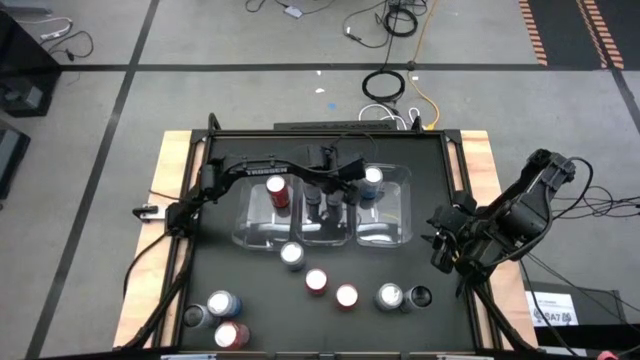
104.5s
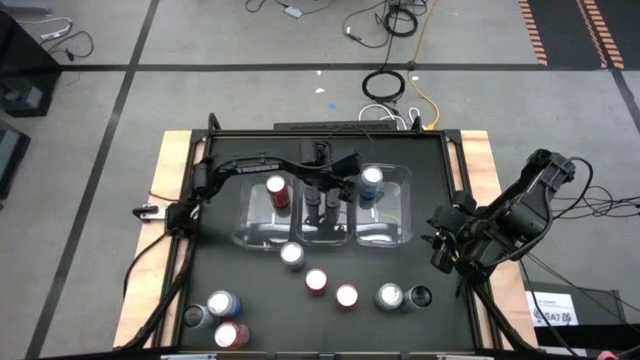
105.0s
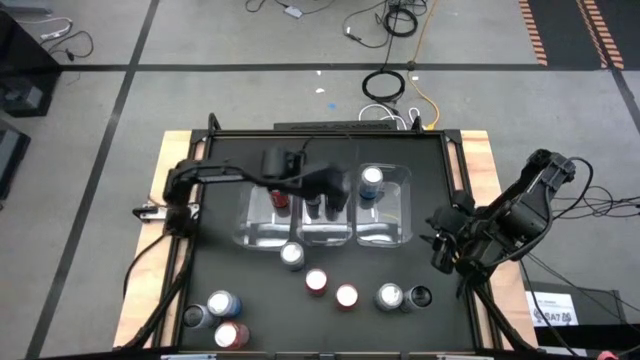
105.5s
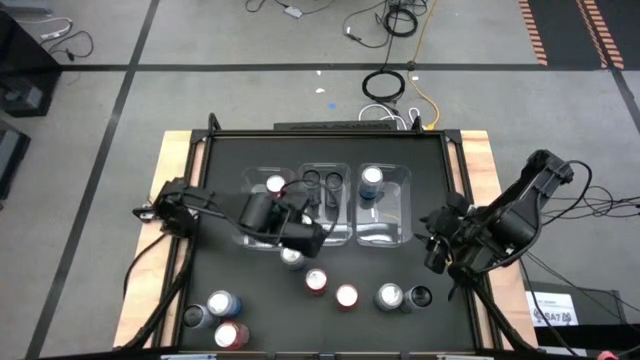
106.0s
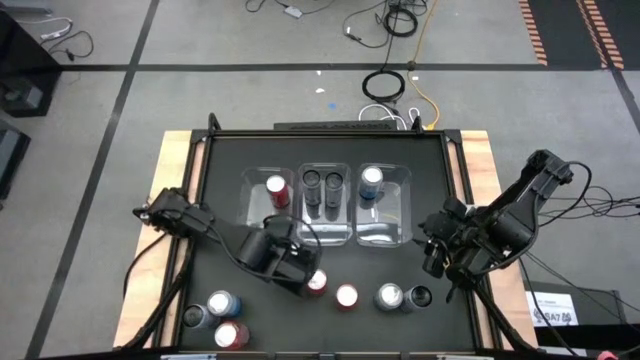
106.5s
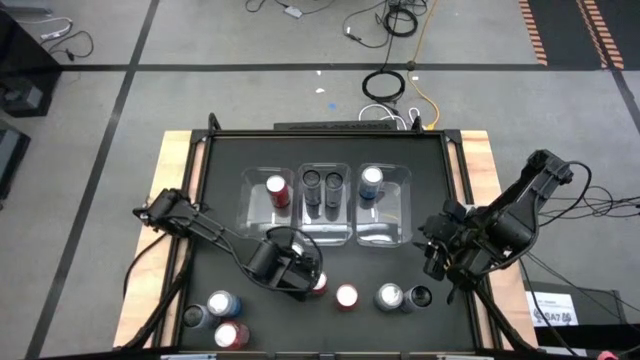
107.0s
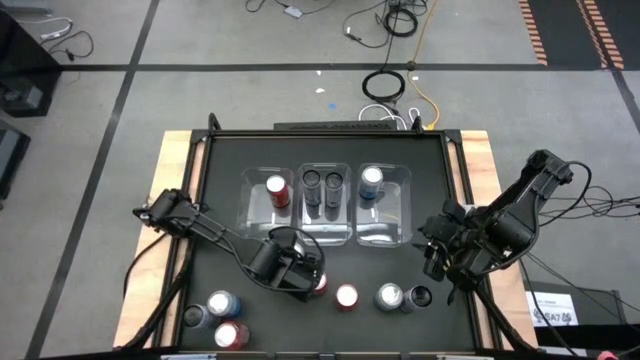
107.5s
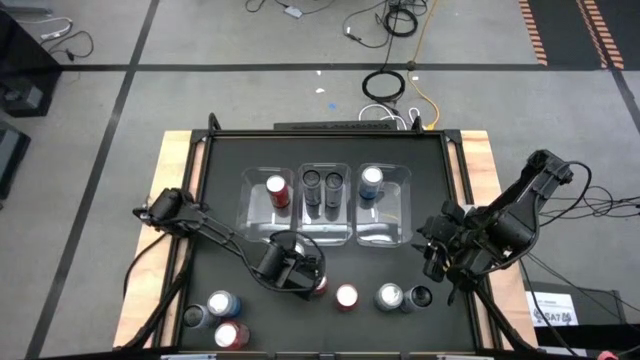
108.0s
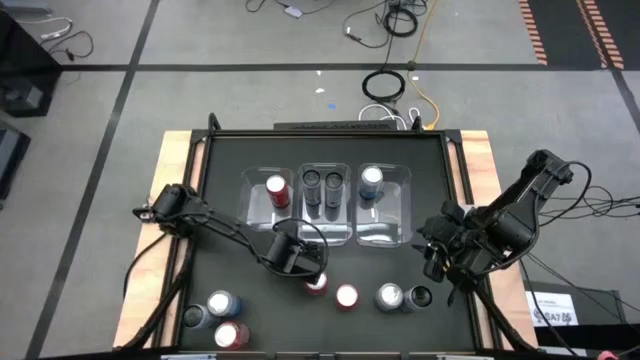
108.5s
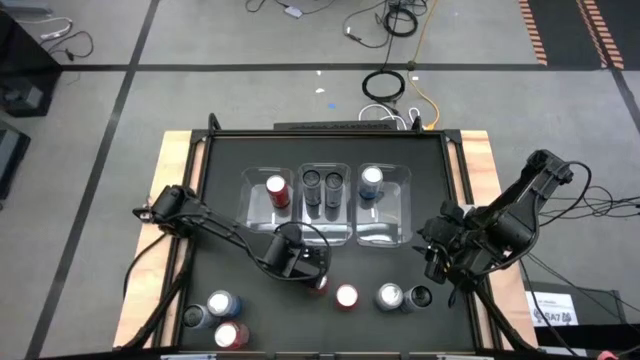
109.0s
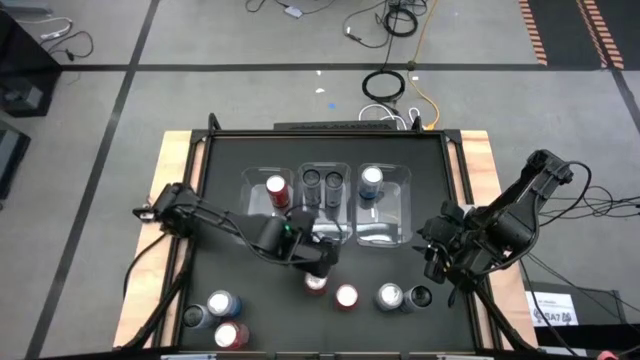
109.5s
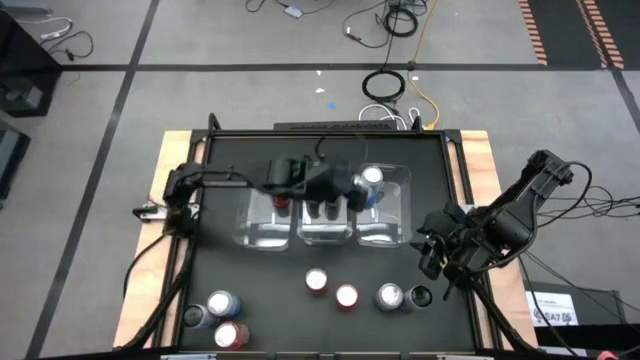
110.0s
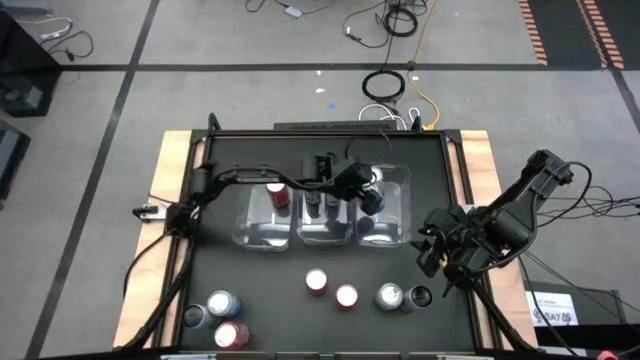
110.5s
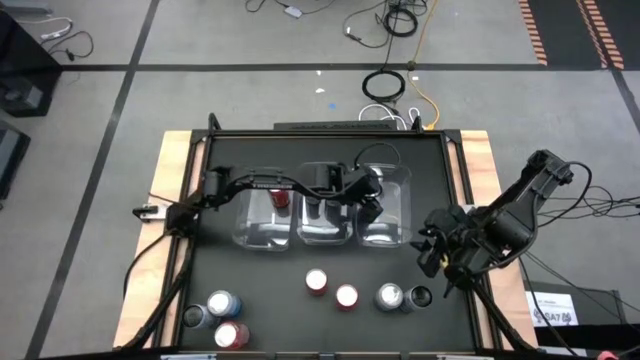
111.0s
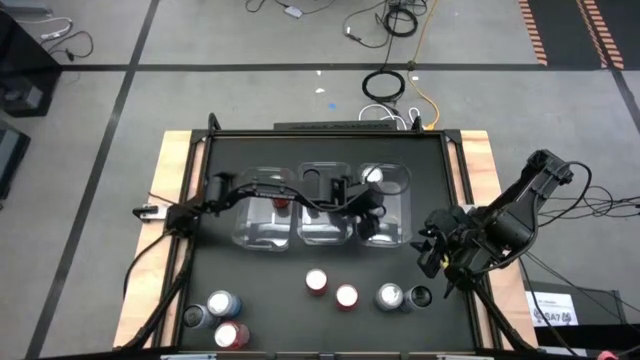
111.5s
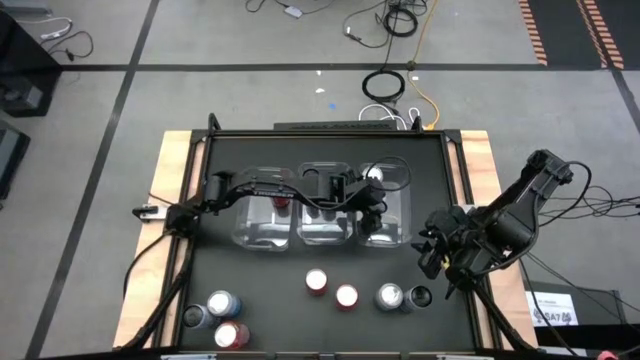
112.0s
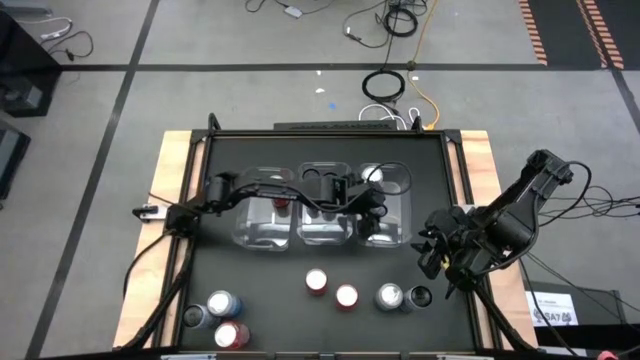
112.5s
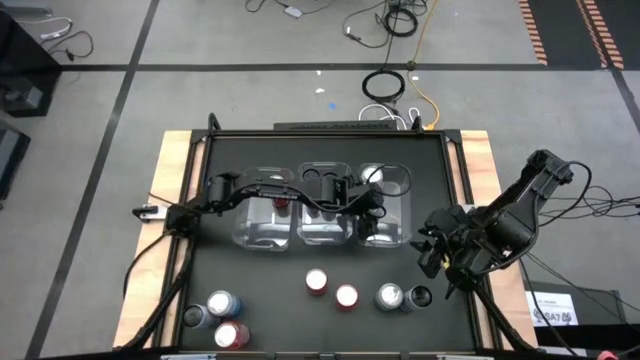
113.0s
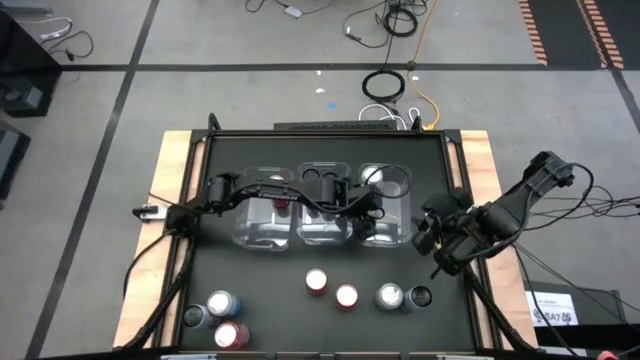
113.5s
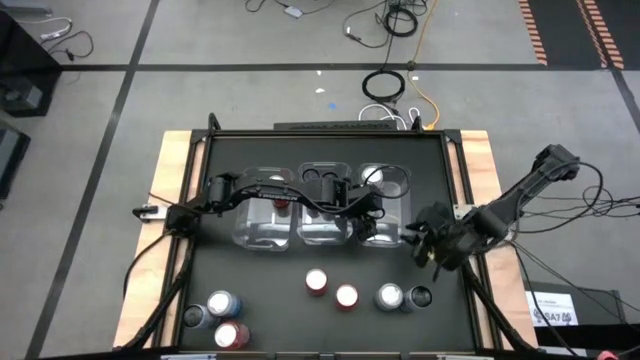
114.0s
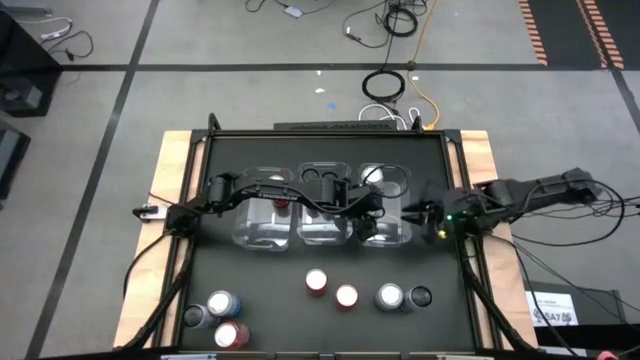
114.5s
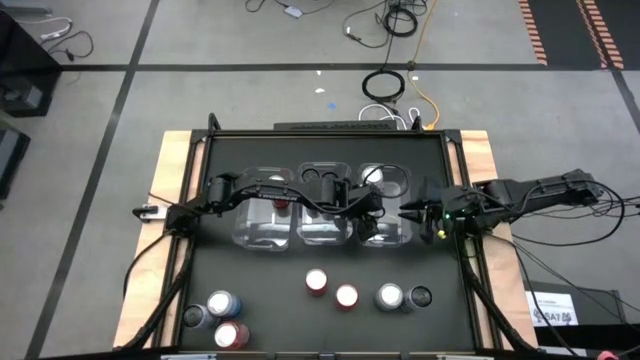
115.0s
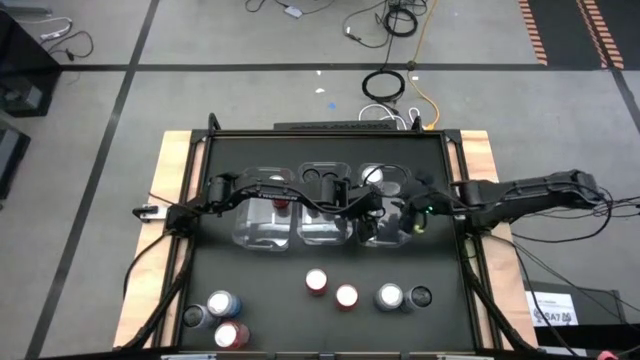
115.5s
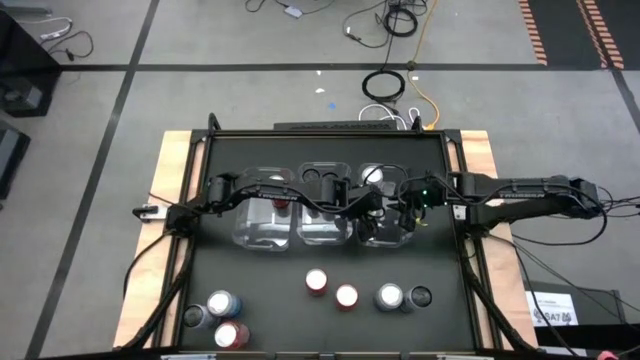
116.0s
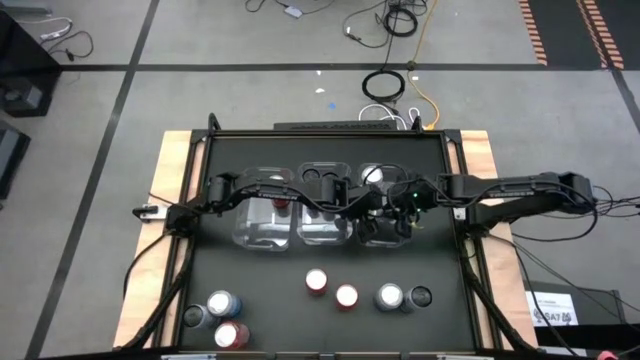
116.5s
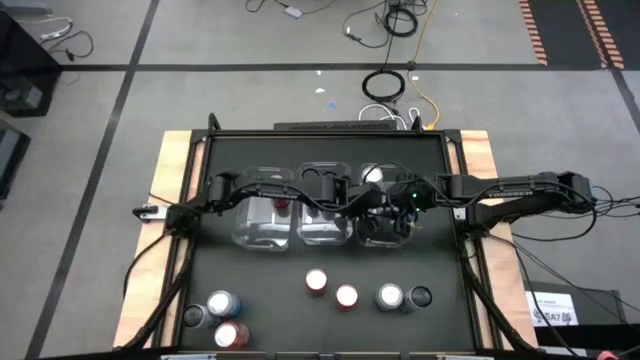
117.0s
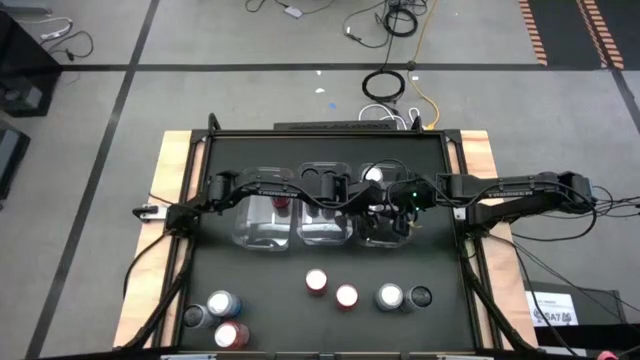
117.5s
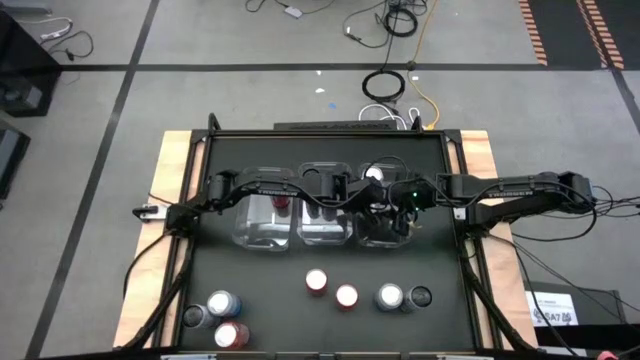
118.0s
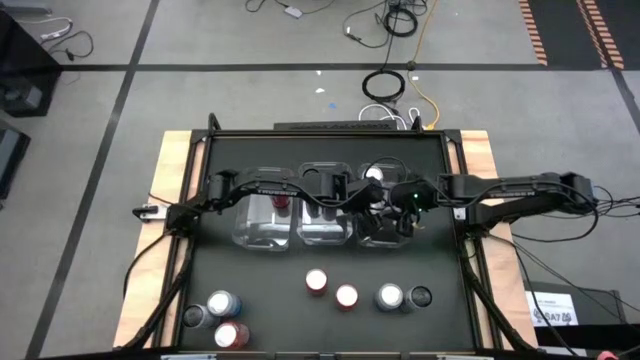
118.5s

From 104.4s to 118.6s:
Task: Sort soda cans
Put the blue-white soda can into the middle right transparent bin

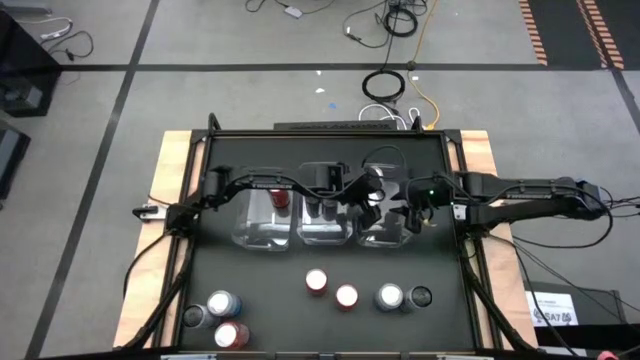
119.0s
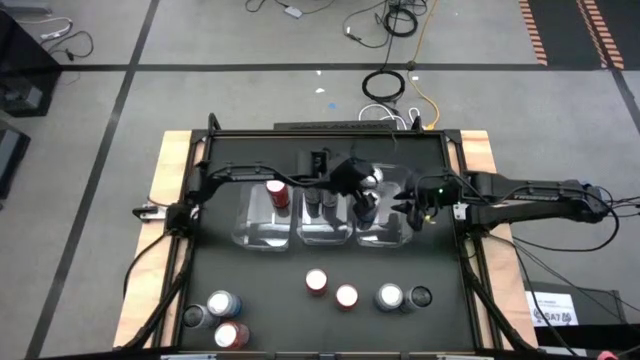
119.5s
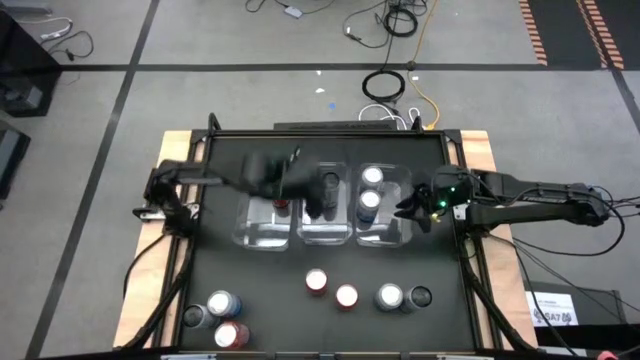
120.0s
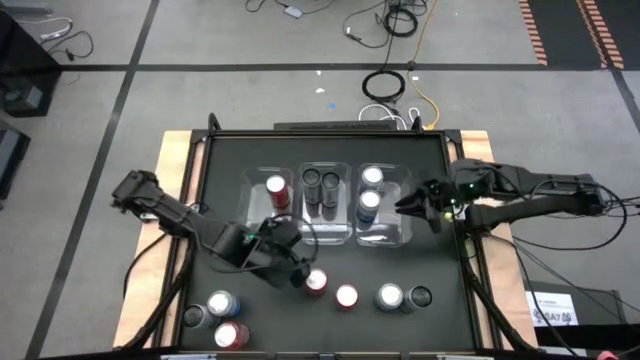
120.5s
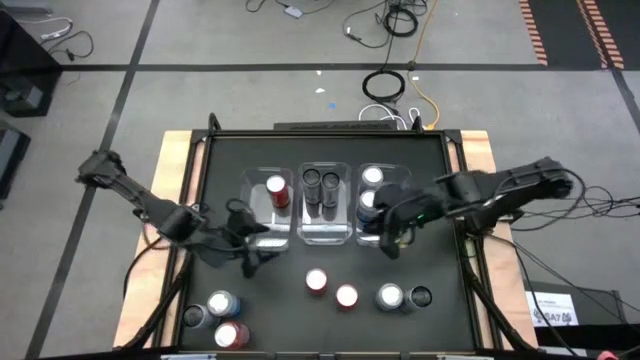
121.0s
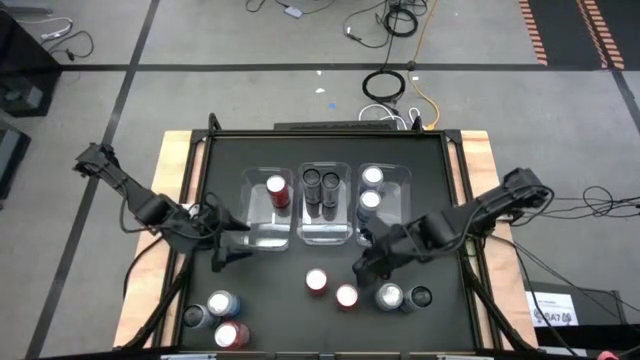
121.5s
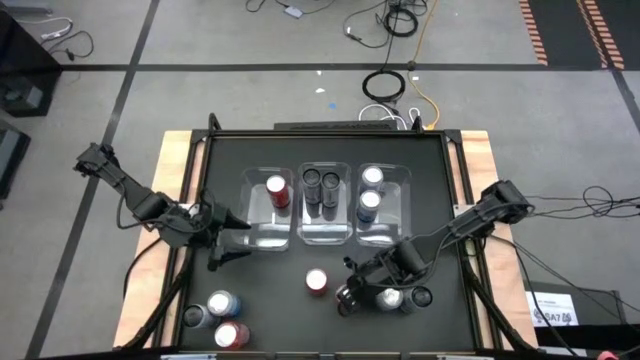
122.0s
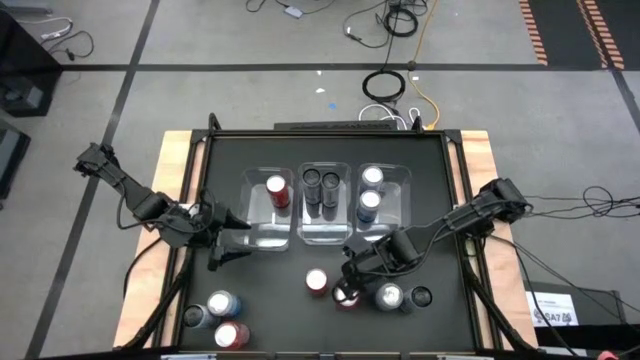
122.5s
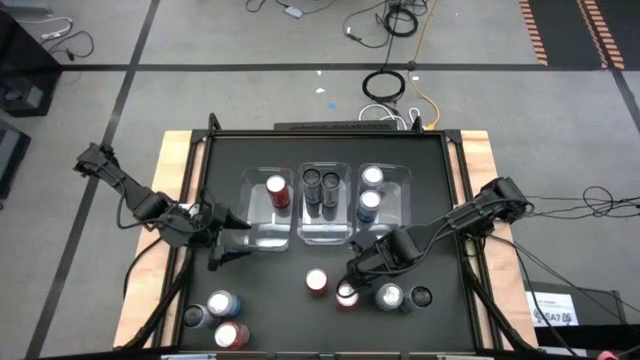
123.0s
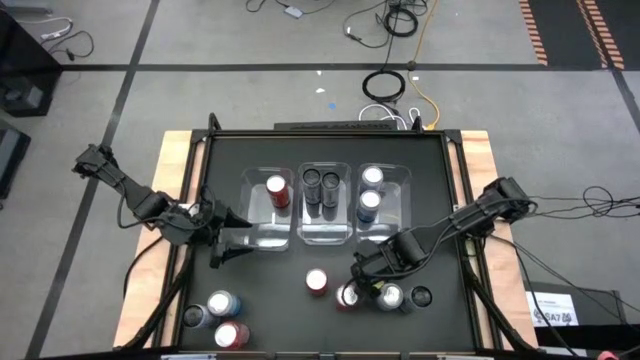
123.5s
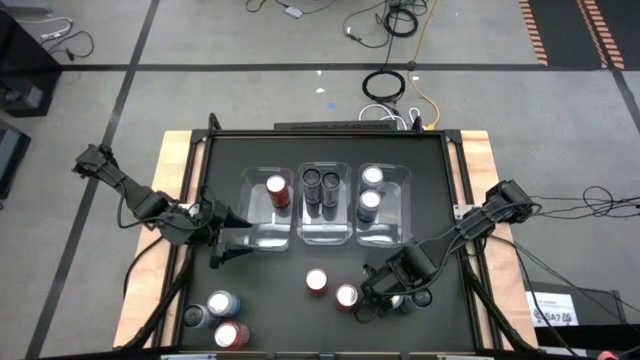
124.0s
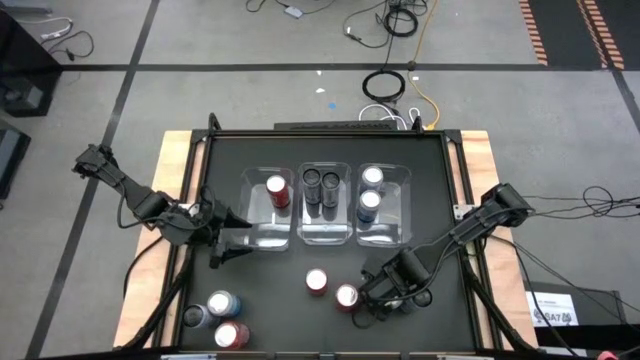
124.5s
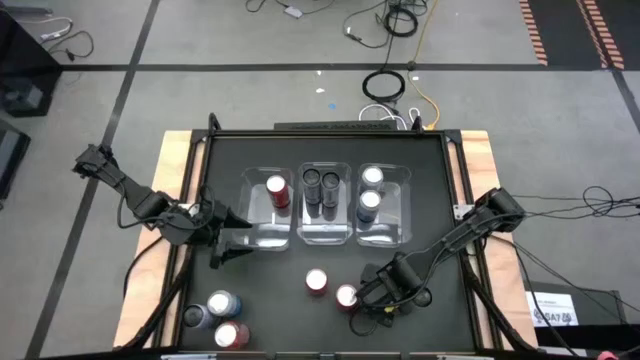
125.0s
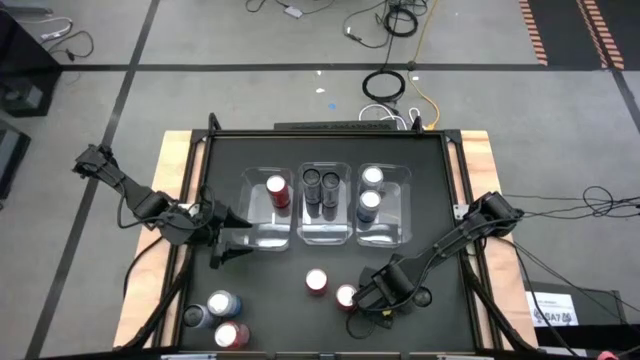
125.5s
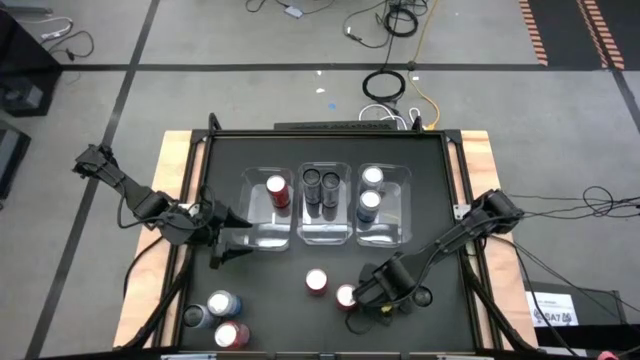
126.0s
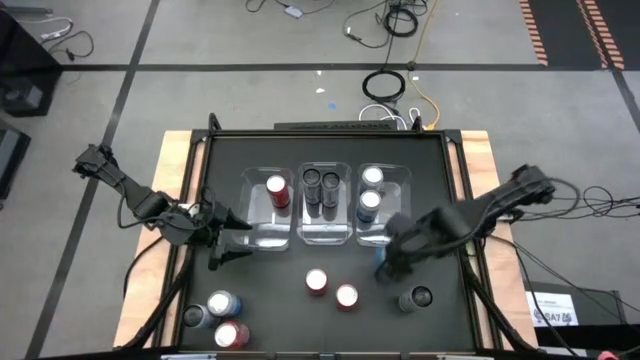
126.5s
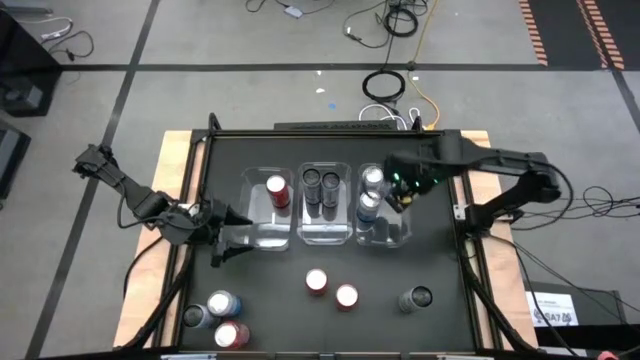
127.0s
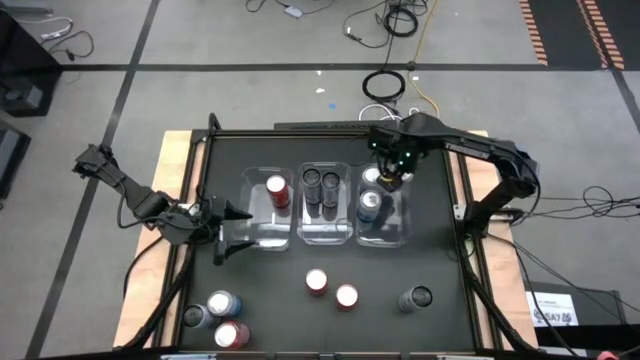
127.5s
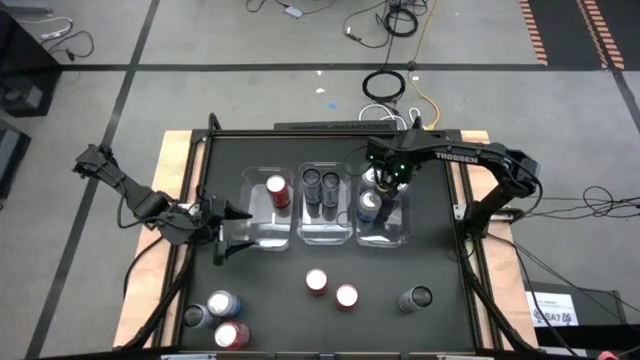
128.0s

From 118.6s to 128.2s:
Put the blue-white soda can into the middle right transparent bin
